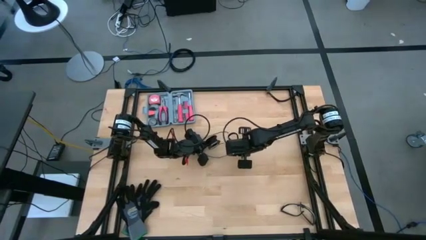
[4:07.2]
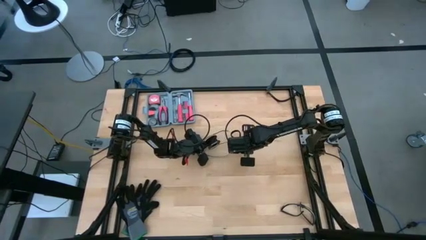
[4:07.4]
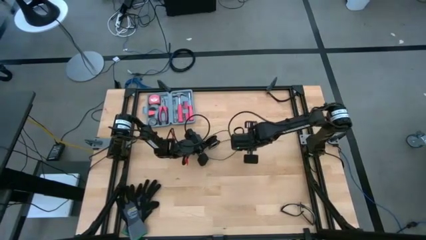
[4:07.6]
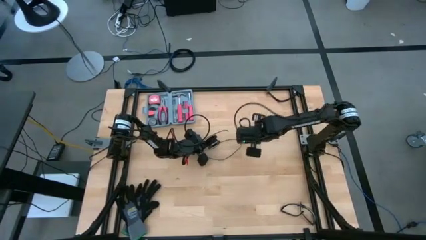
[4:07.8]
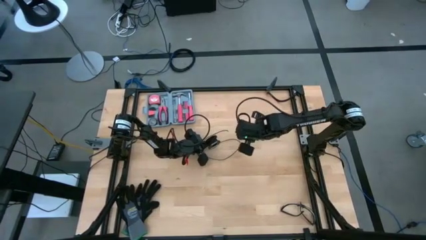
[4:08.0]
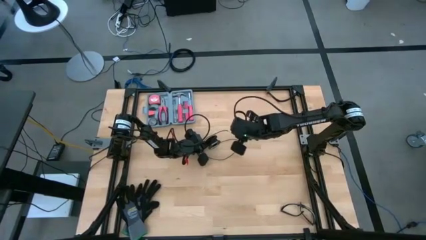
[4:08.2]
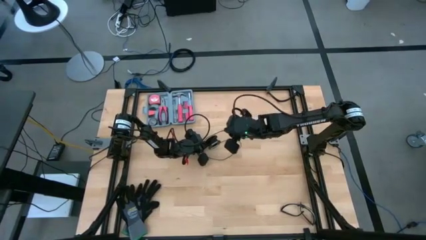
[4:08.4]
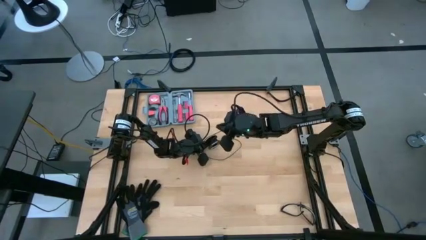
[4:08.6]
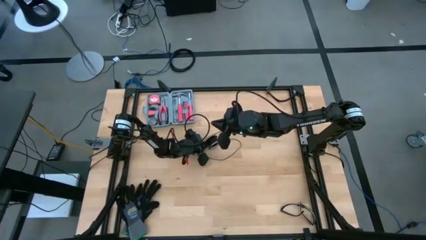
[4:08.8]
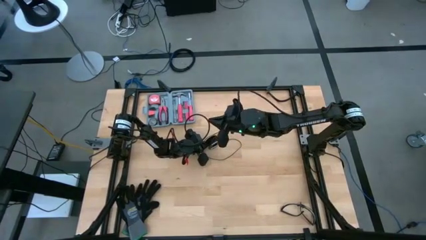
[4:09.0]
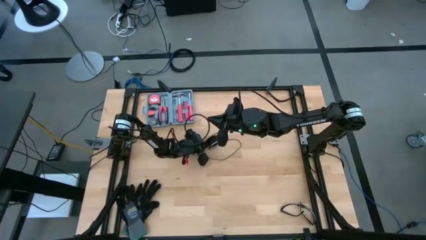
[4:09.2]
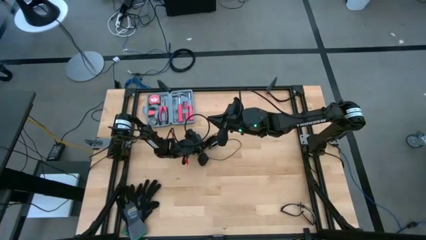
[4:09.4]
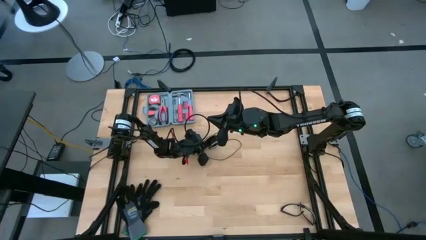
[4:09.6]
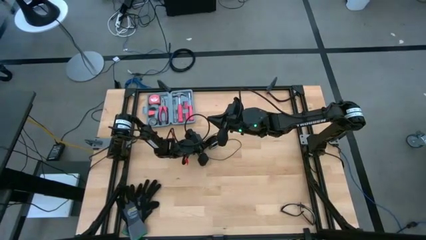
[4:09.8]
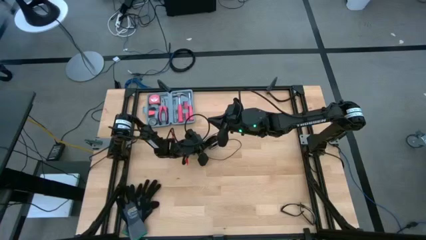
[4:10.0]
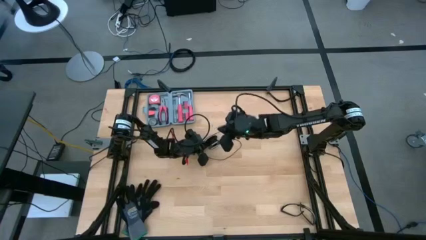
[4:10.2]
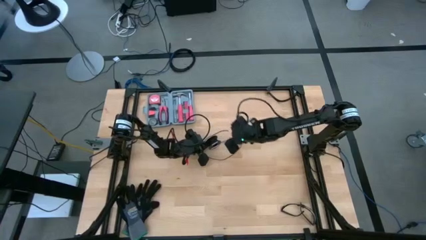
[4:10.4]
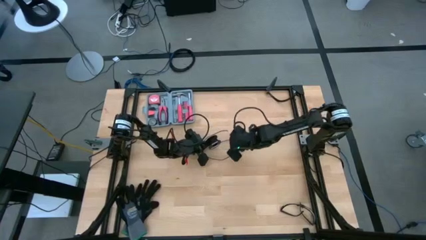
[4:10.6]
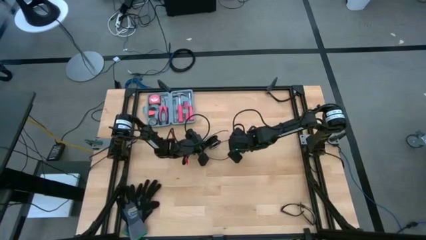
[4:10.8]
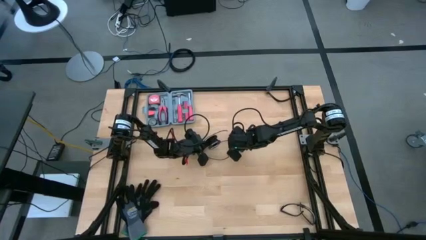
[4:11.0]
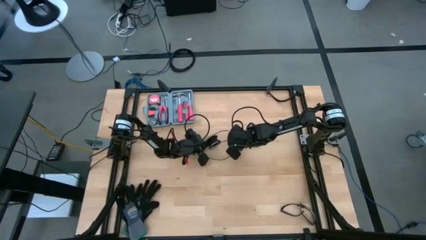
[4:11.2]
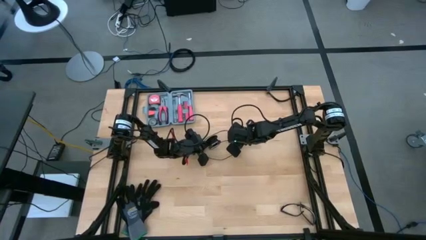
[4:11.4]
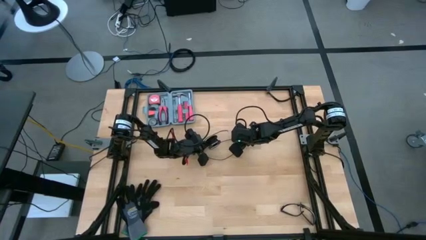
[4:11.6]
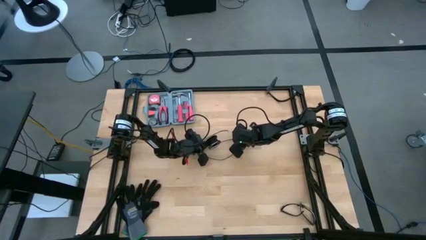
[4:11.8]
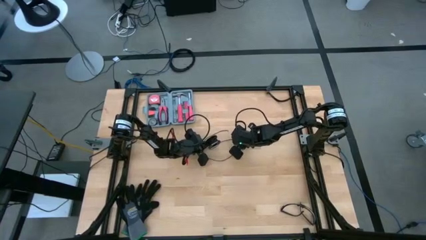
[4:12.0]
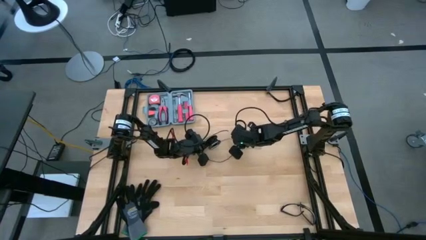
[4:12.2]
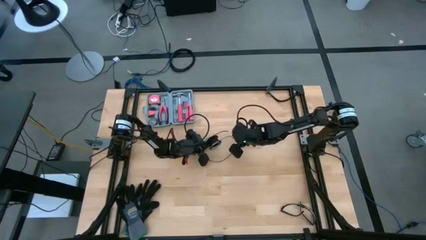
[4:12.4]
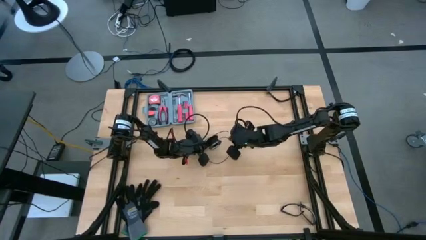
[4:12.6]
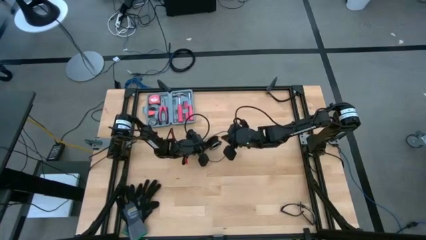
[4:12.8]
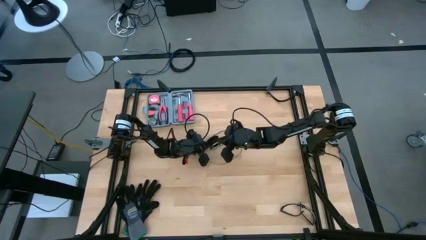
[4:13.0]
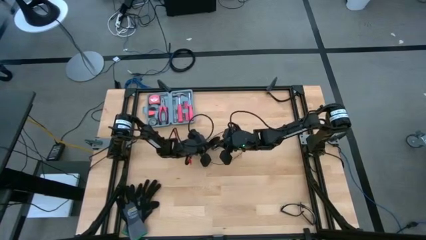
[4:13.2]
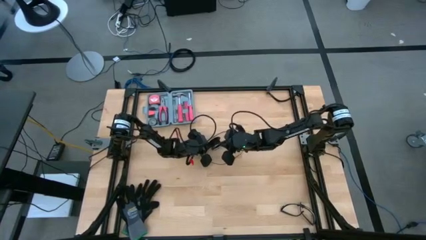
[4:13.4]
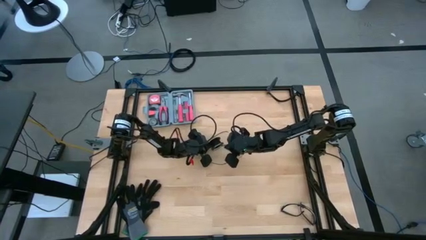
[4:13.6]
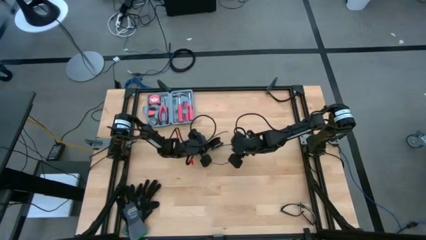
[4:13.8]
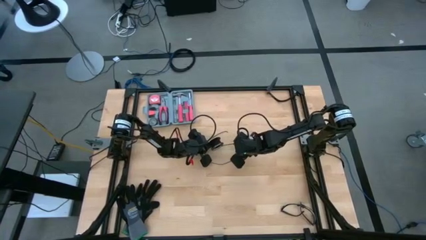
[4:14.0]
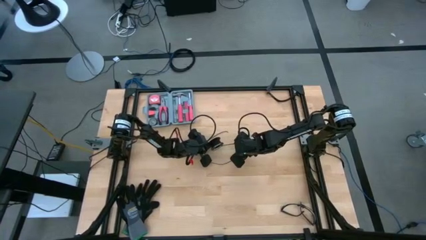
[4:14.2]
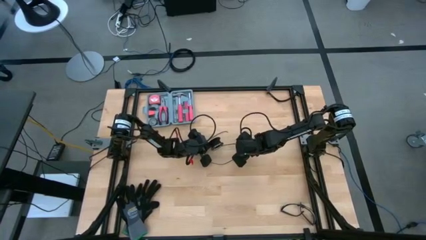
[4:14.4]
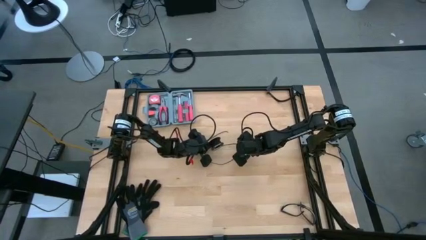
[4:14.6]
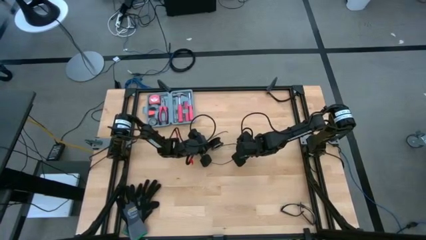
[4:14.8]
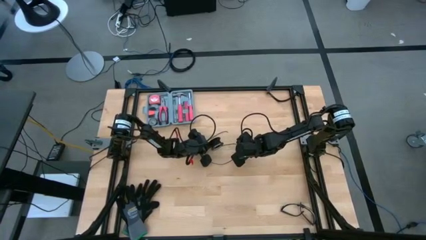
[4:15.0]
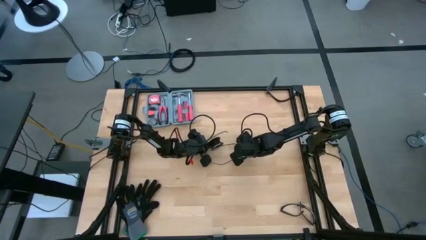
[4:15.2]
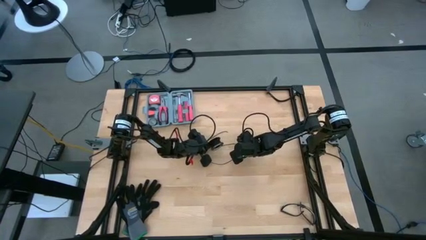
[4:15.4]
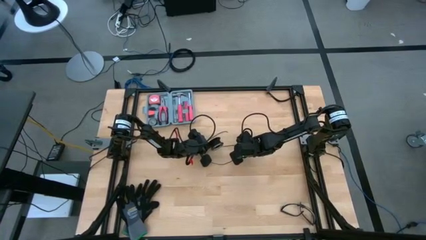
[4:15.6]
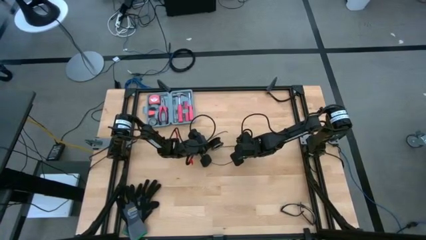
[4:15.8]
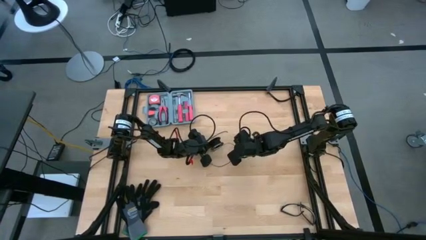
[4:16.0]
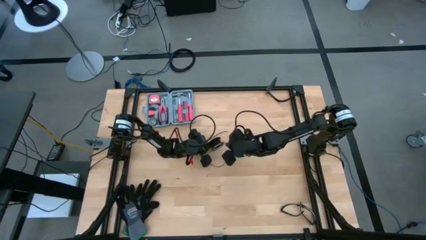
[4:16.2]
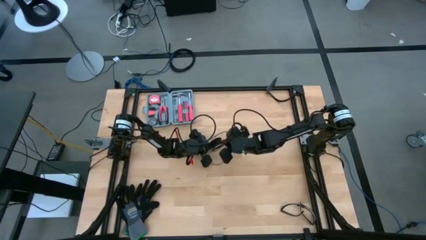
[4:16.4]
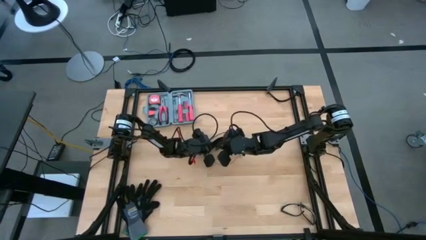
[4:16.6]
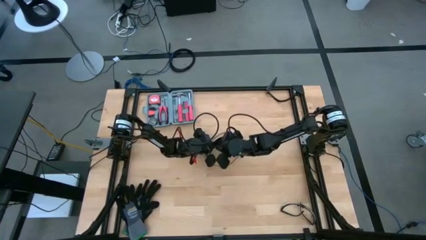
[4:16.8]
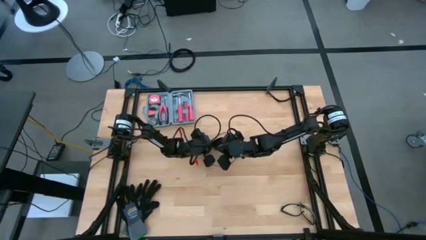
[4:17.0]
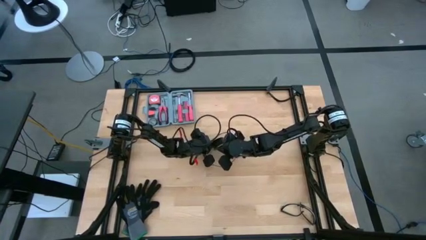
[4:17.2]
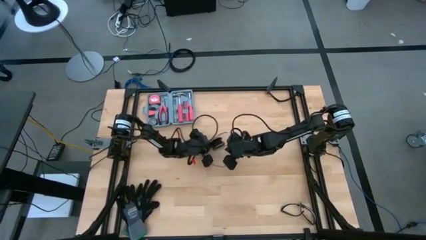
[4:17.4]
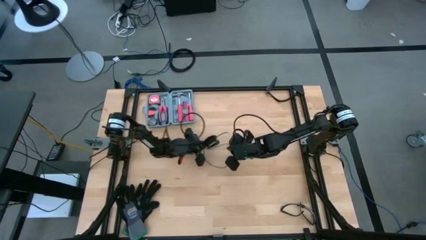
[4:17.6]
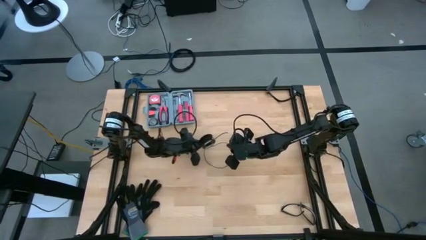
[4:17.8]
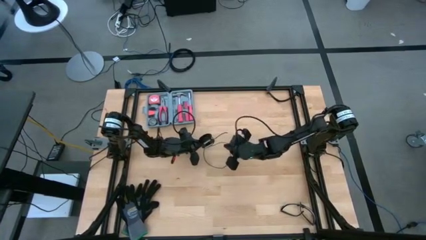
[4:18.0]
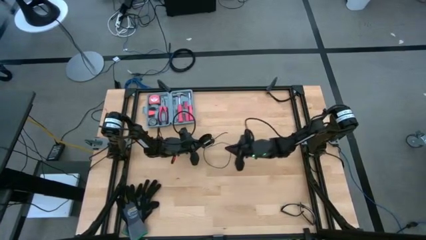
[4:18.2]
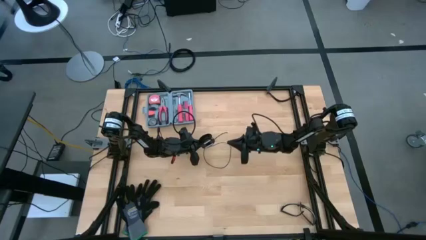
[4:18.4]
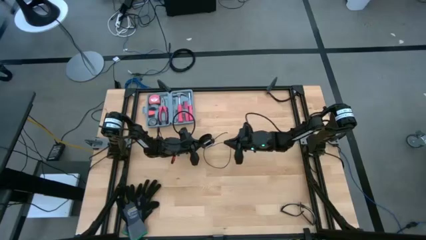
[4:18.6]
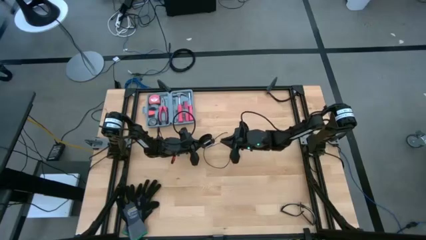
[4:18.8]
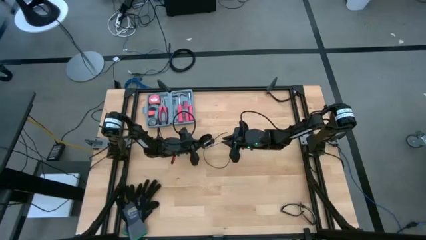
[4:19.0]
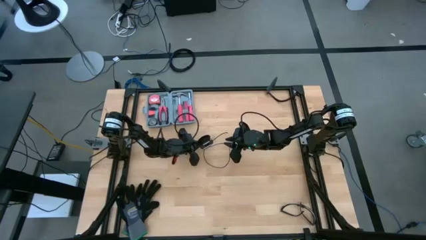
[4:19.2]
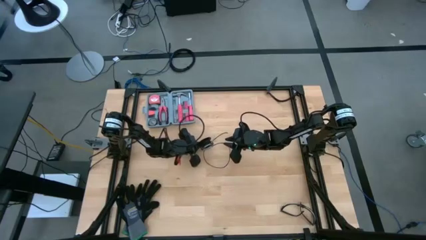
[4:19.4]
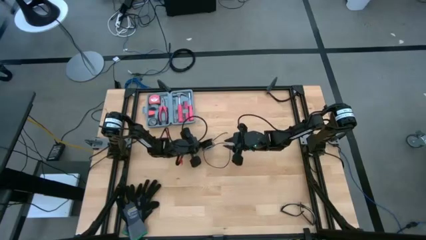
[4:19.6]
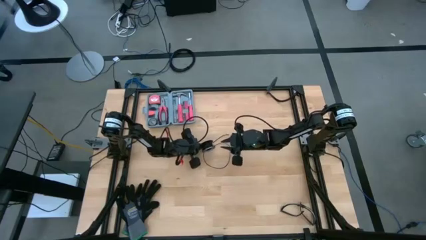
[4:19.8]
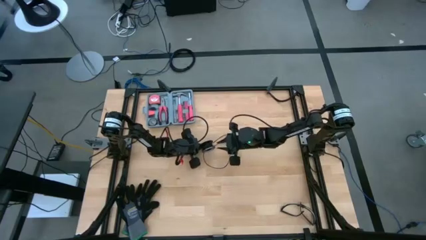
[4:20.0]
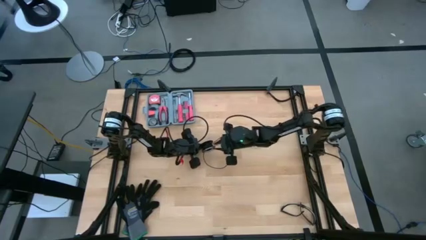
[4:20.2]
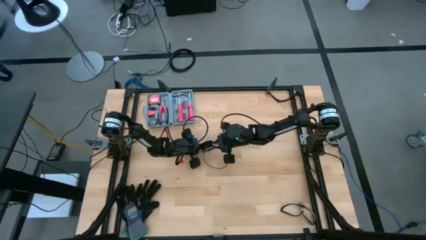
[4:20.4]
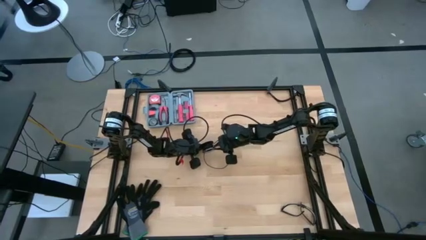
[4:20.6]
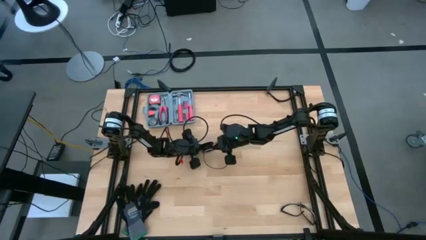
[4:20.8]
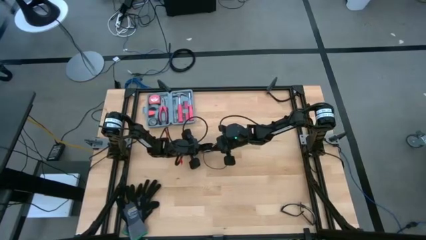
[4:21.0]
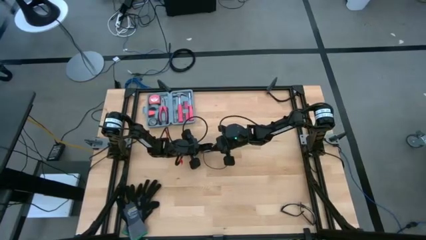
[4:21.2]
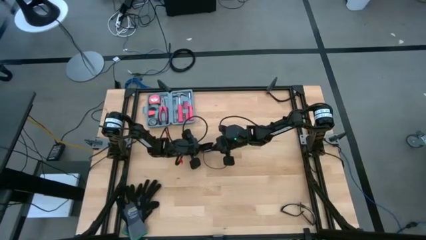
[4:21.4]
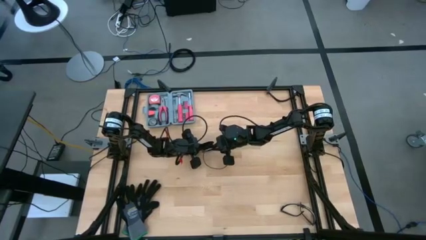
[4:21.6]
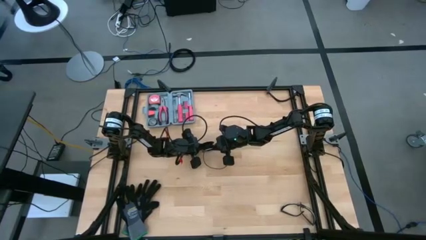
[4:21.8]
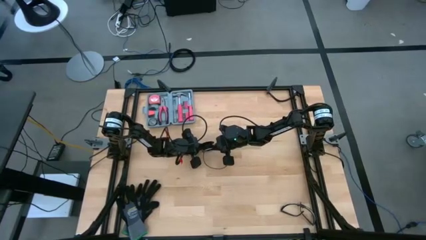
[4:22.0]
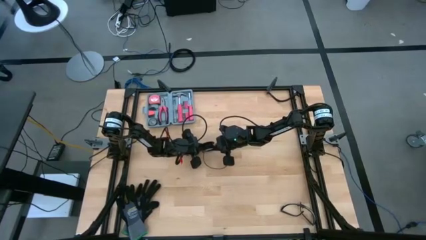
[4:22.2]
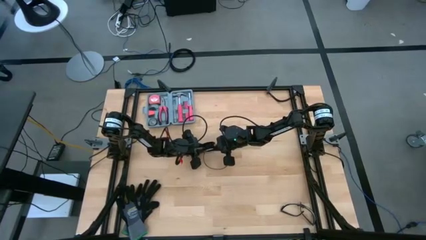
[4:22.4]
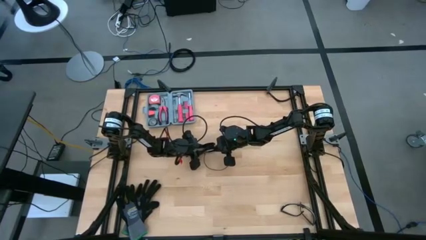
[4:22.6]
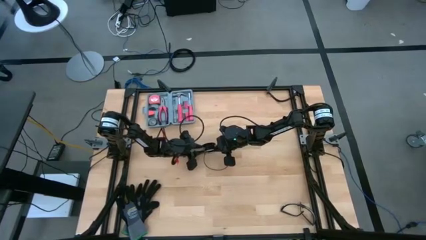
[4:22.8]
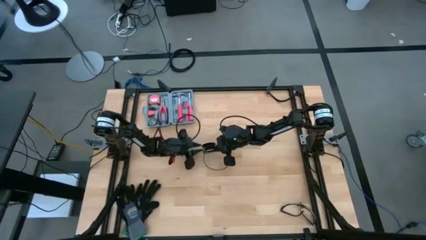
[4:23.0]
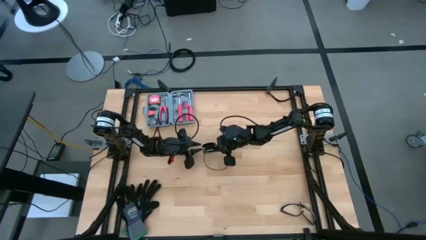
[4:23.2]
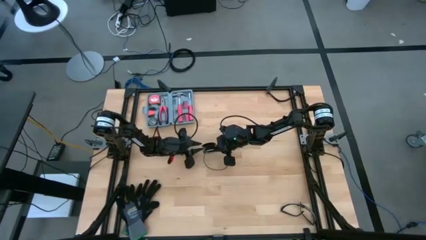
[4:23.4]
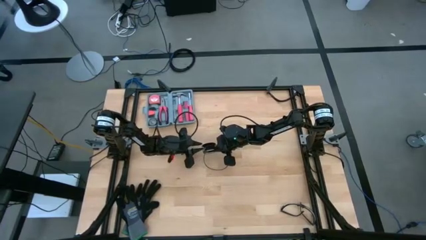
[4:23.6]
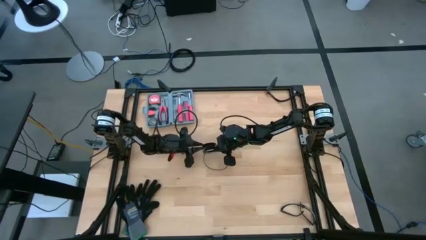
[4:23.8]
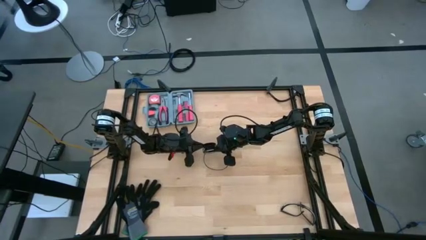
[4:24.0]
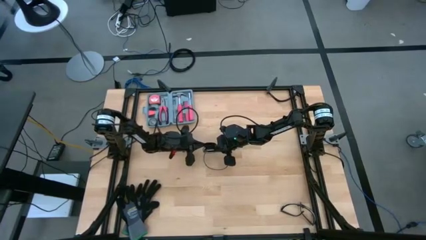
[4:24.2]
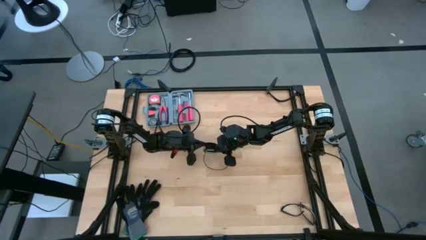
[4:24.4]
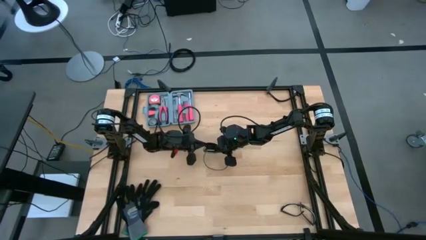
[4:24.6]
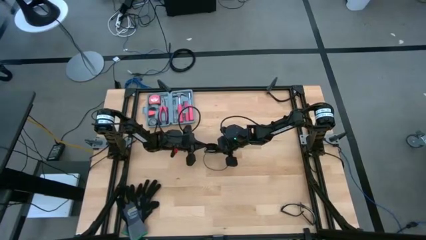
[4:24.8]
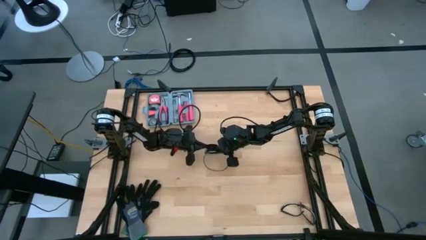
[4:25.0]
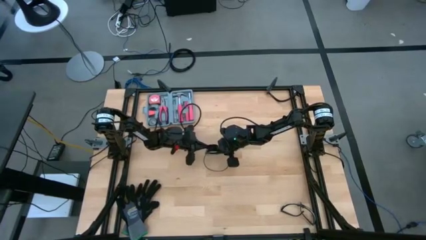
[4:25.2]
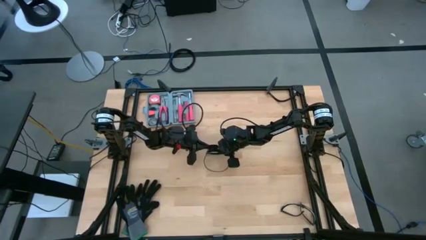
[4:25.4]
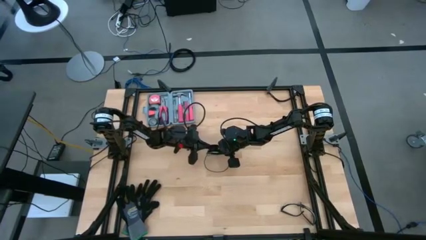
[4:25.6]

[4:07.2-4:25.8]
Task: Coil cords
Coil the black wire onto the spool
